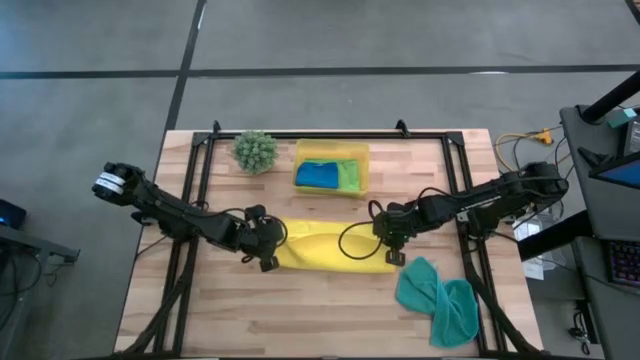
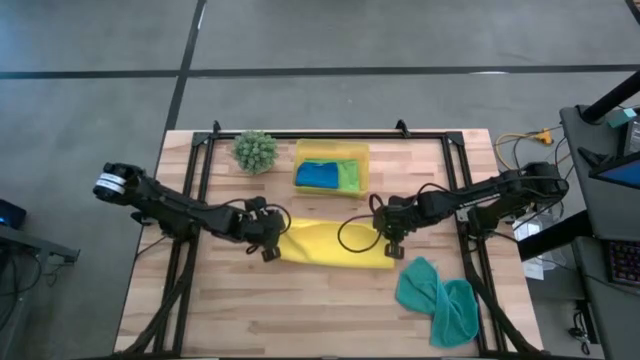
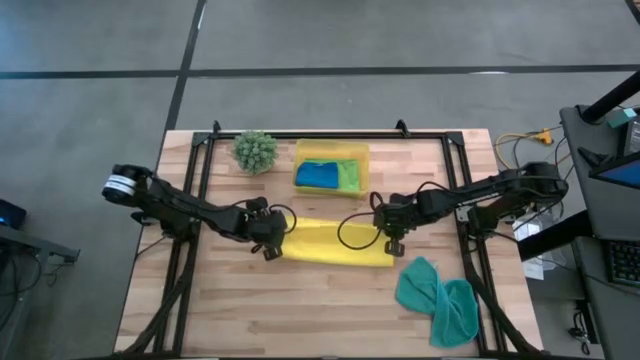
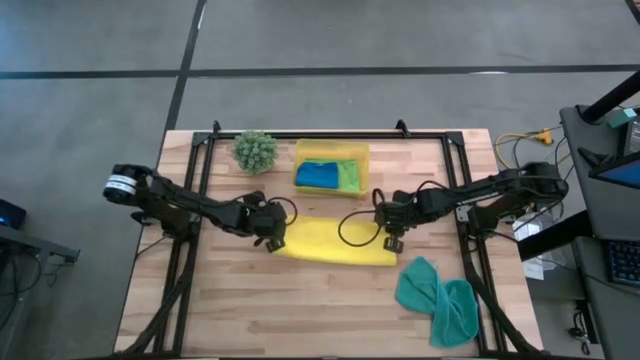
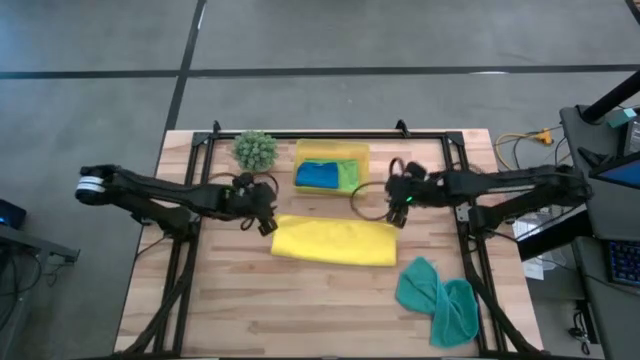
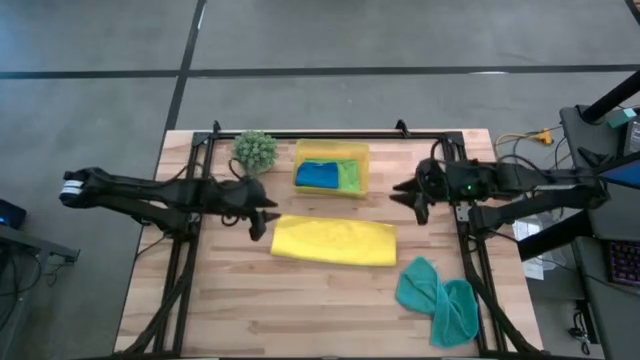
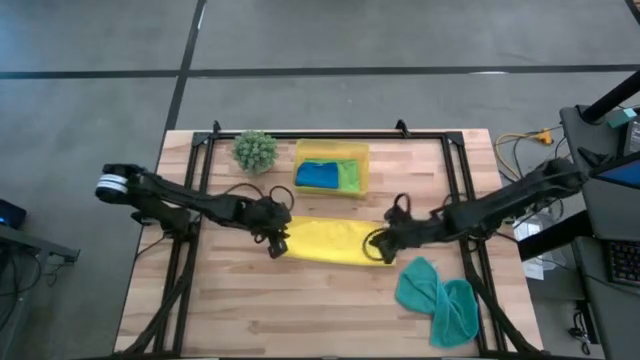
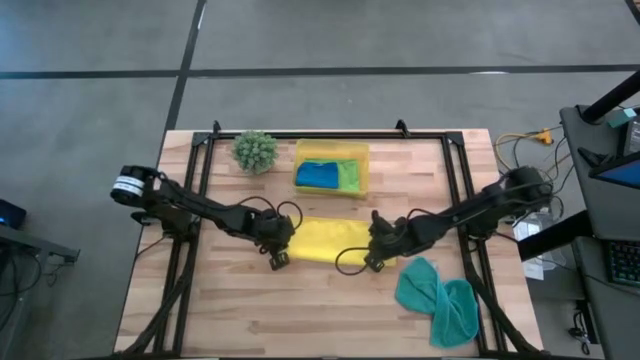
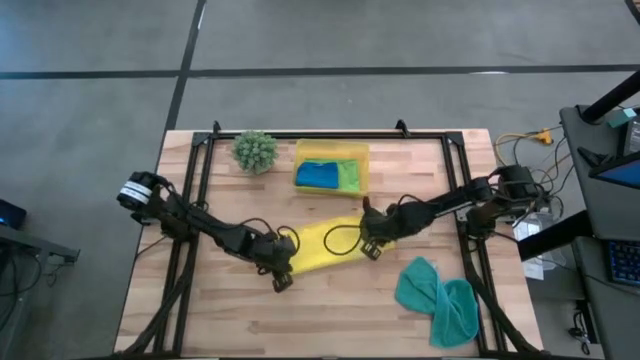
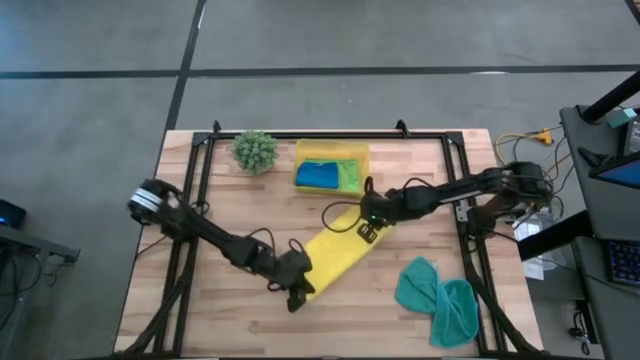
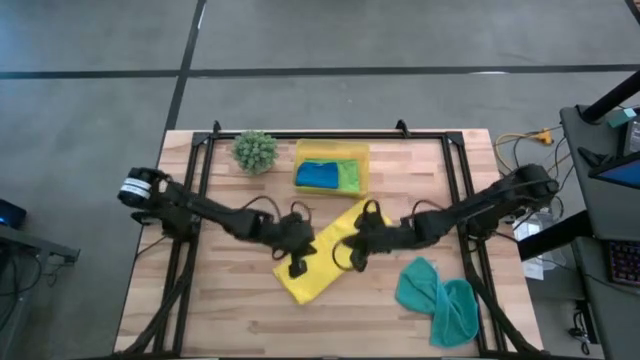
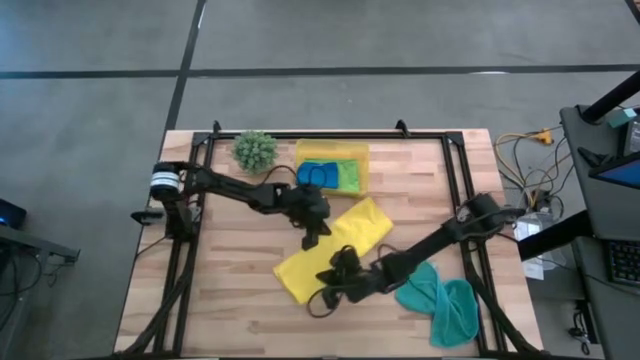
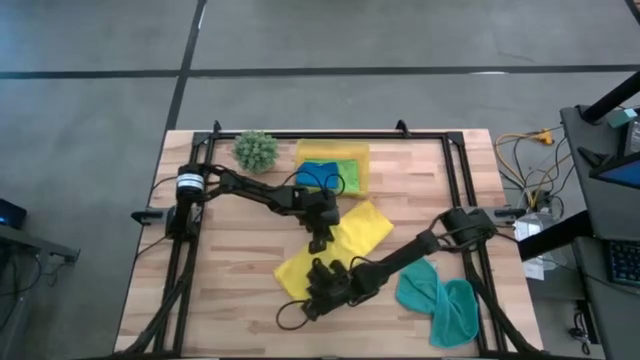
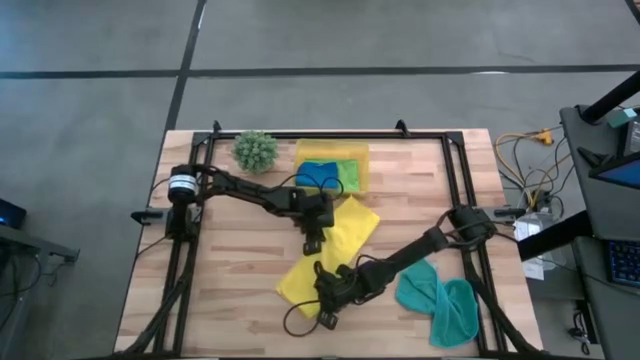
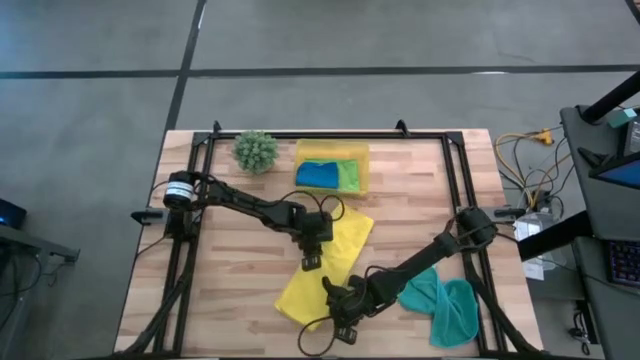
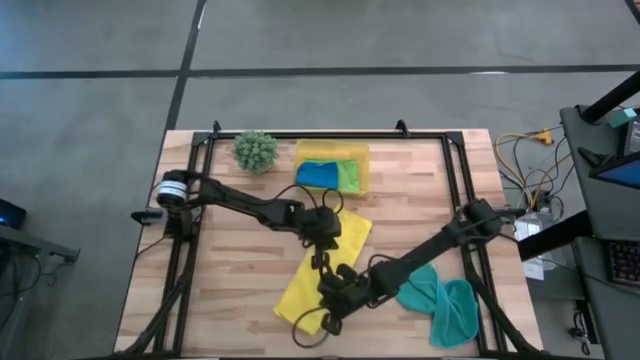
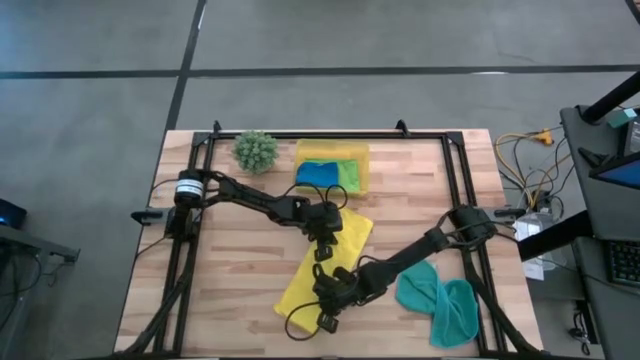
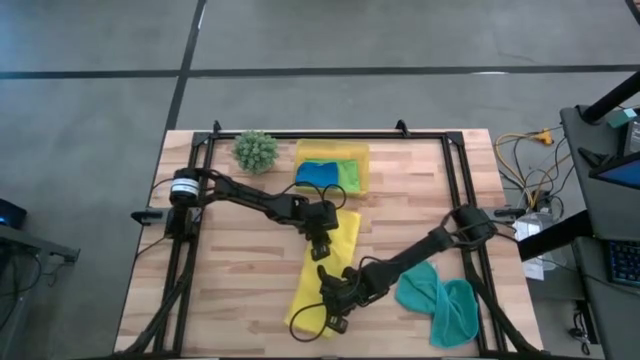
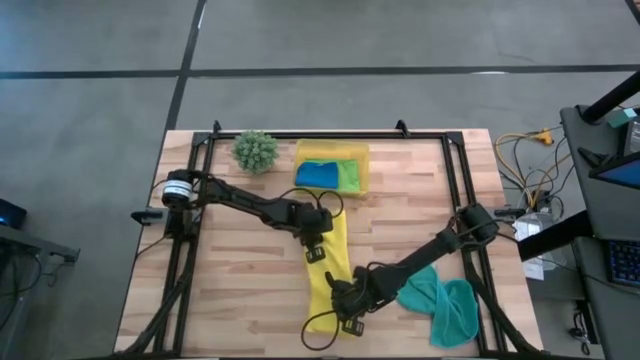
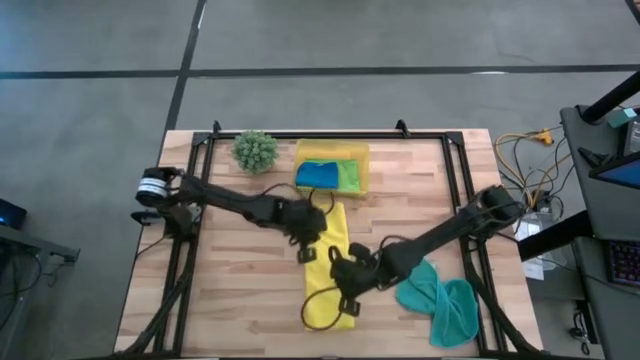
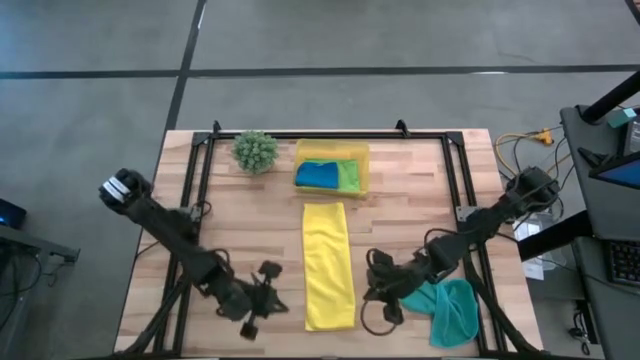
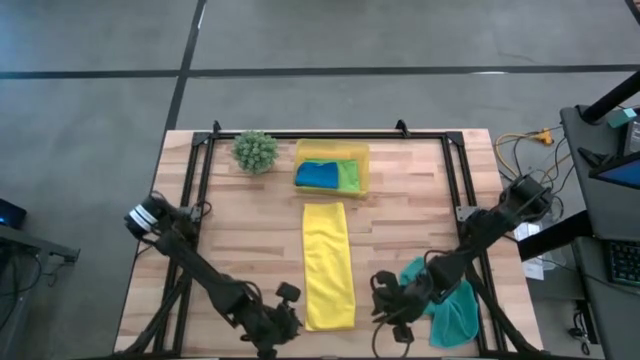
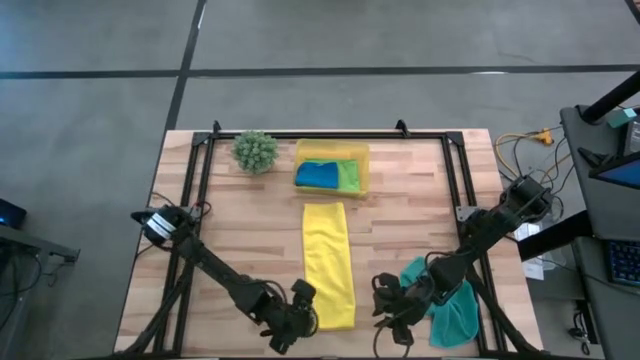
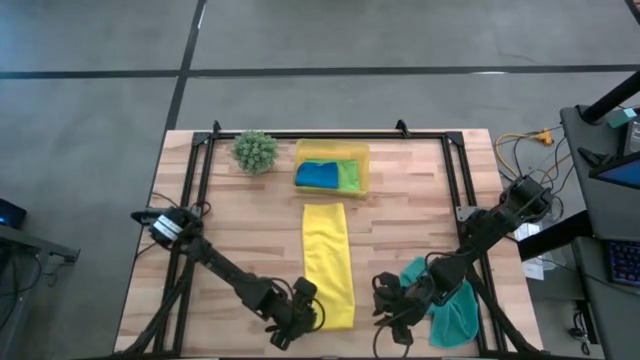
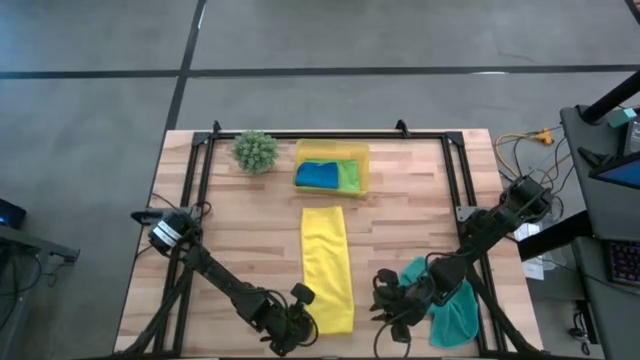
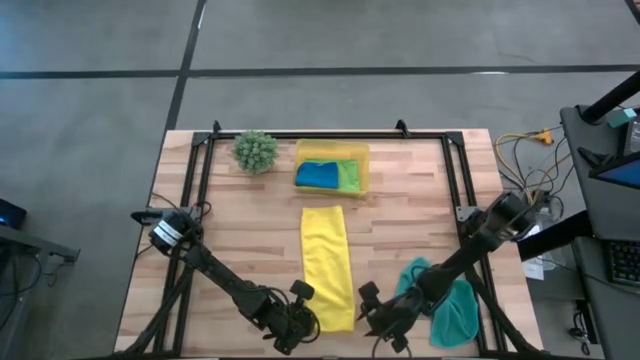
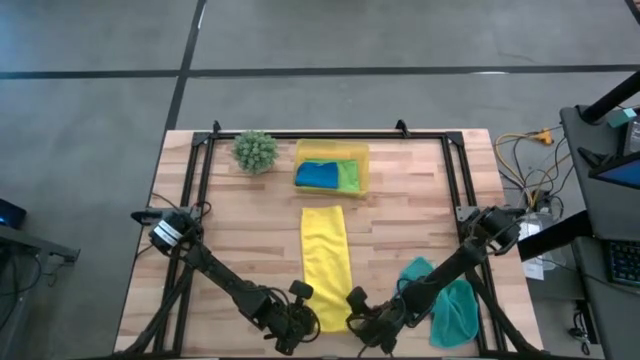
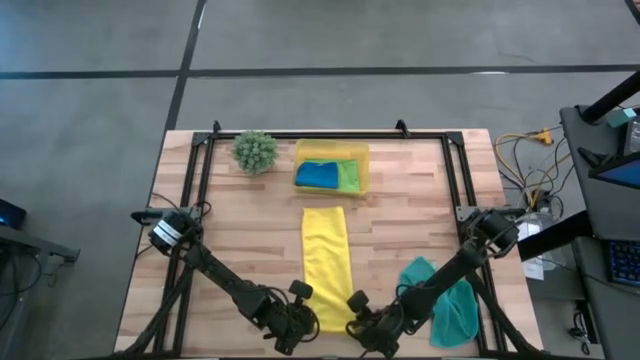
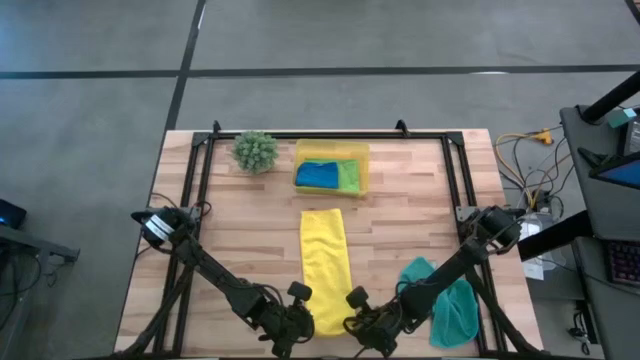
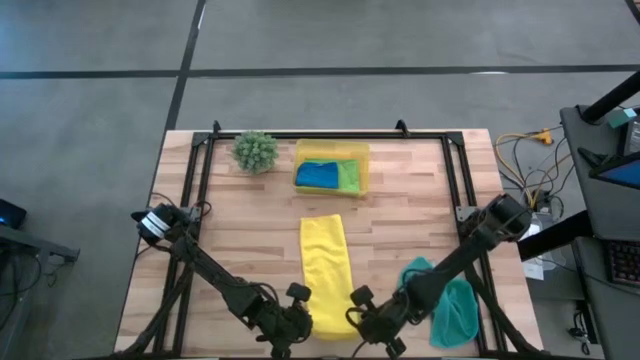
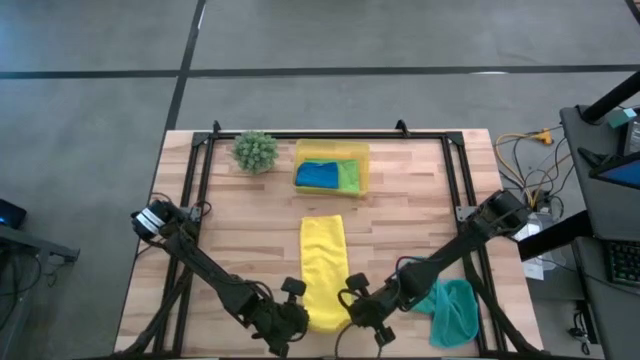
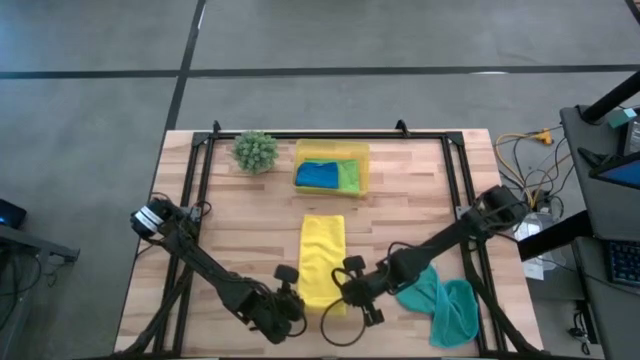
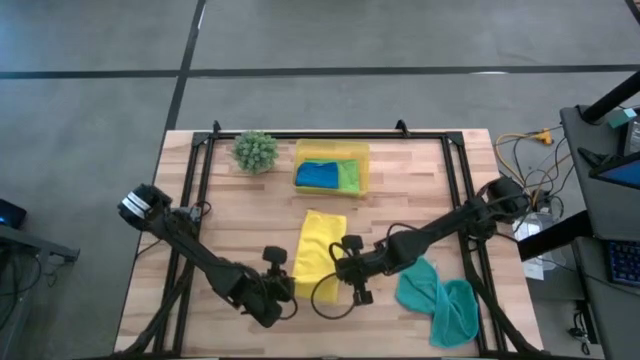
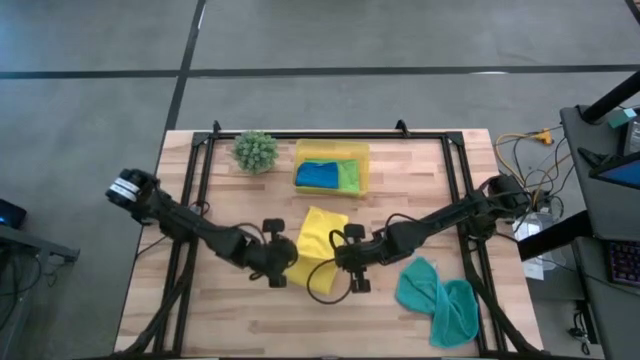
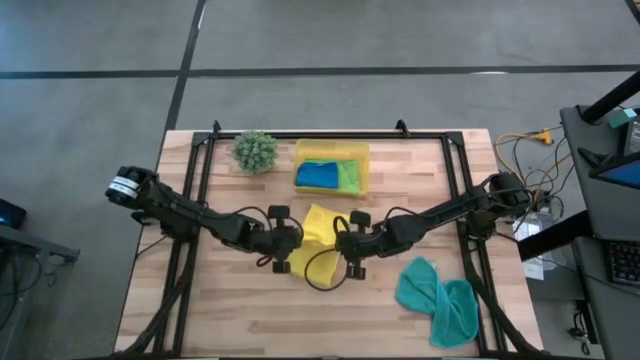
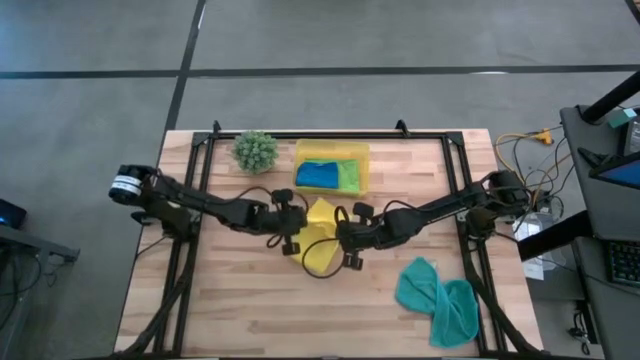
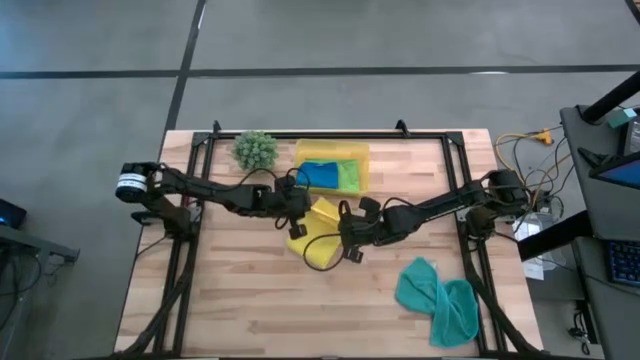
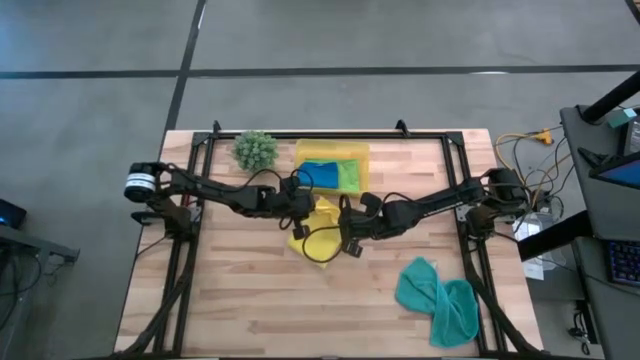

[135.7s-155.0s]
Task: Fold microfiber towels
Fold the yellow towel

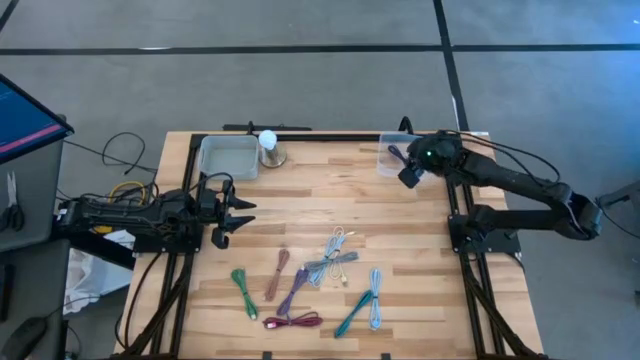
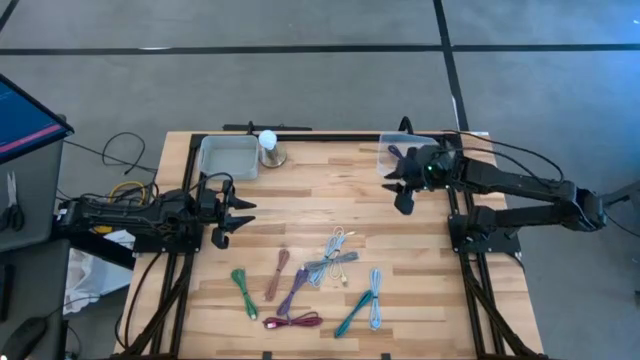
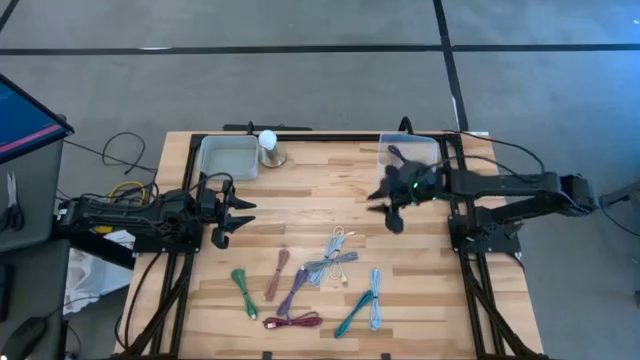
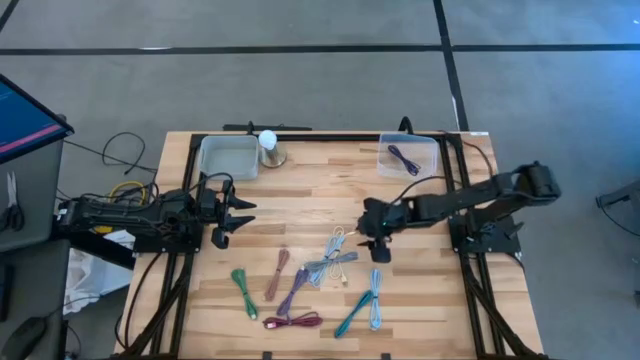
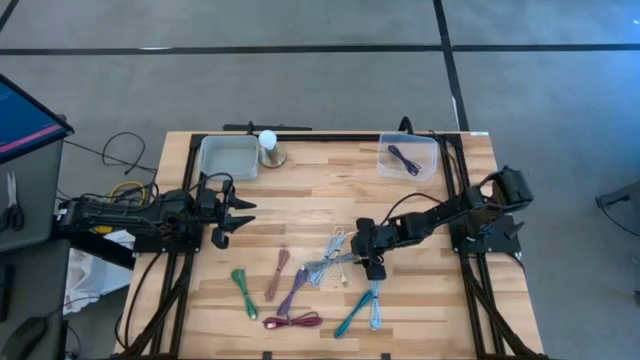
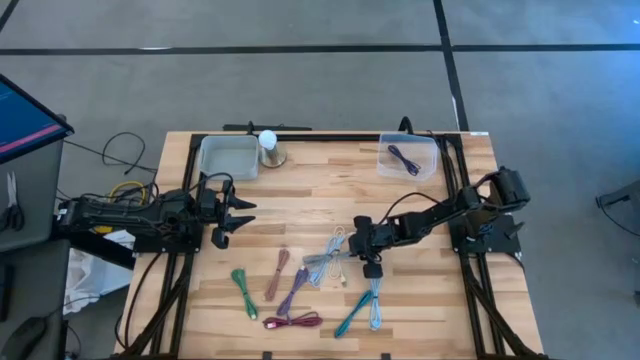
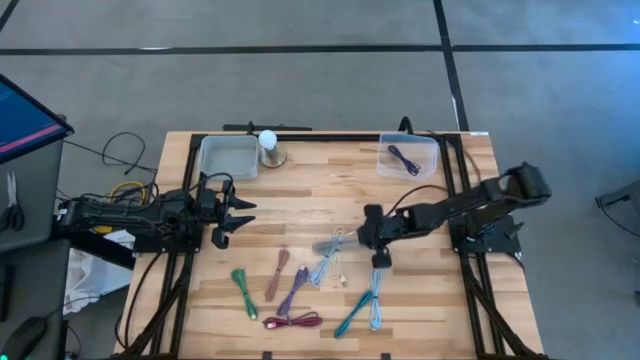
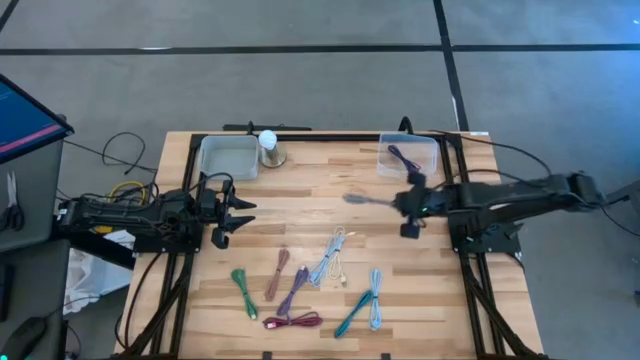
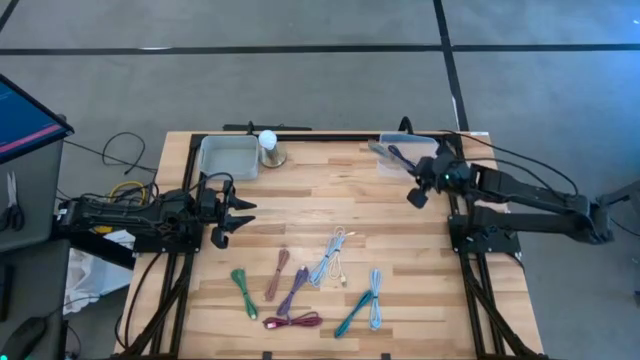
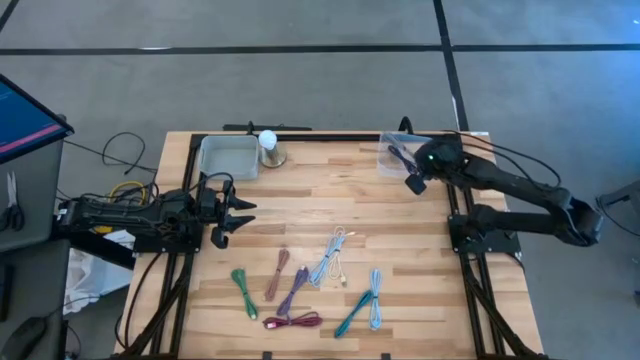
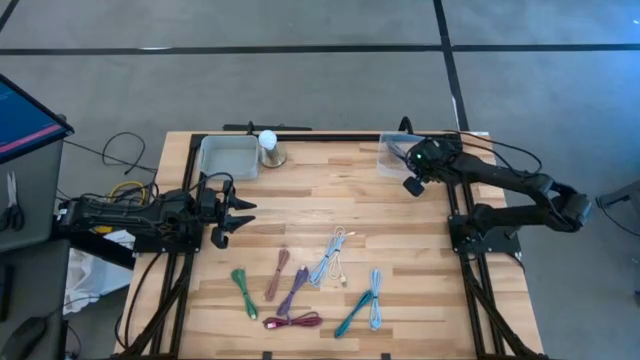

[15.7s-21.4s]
Task: Pick & Place USB Port
Put the white patterned charger cable into the transparent bin
